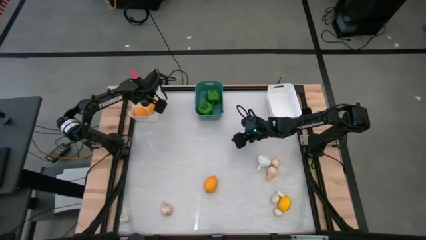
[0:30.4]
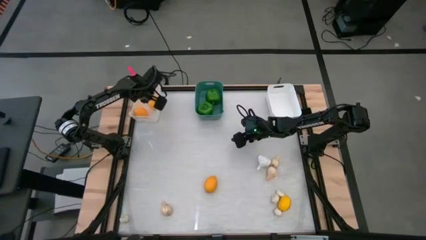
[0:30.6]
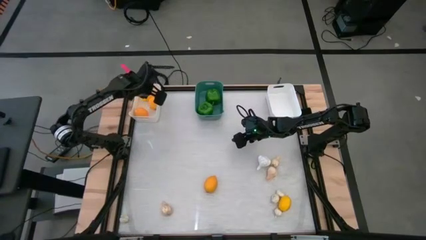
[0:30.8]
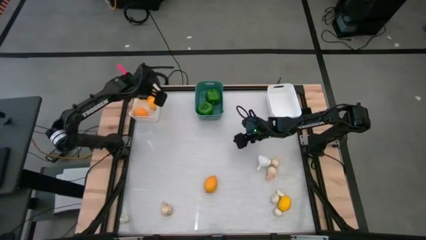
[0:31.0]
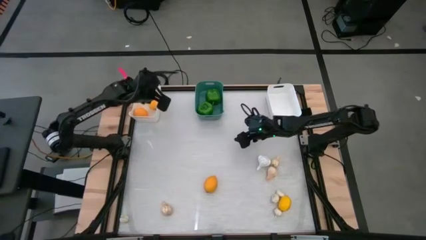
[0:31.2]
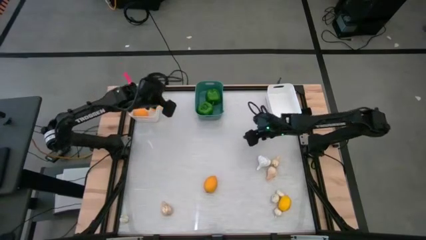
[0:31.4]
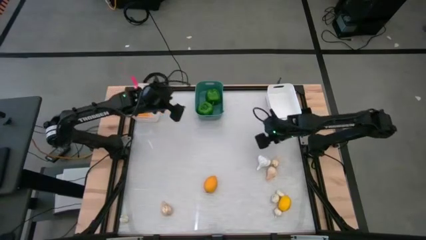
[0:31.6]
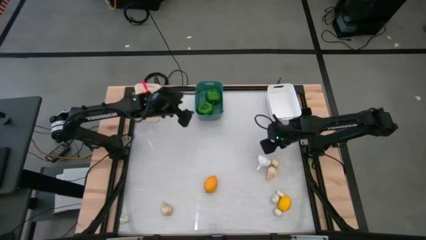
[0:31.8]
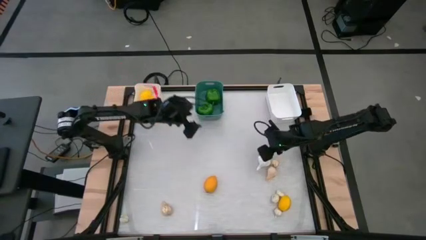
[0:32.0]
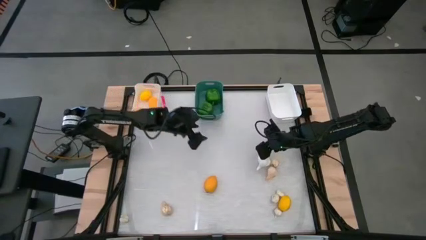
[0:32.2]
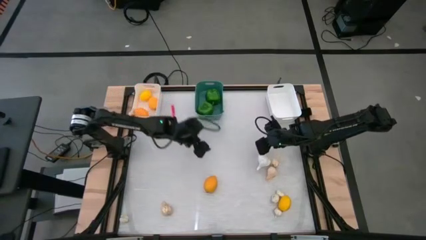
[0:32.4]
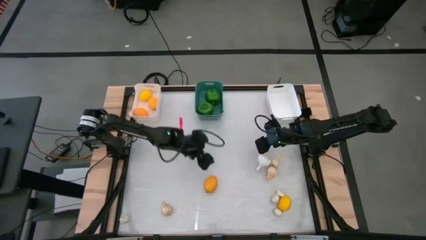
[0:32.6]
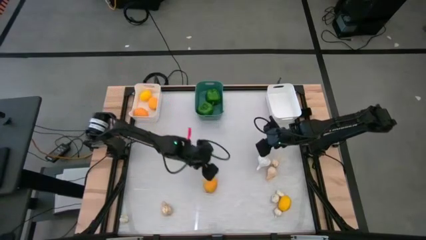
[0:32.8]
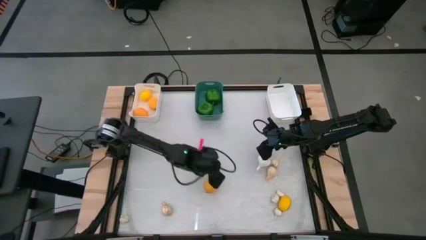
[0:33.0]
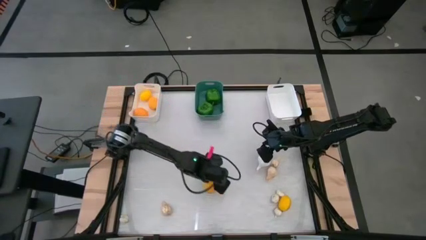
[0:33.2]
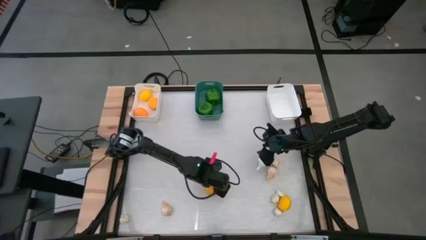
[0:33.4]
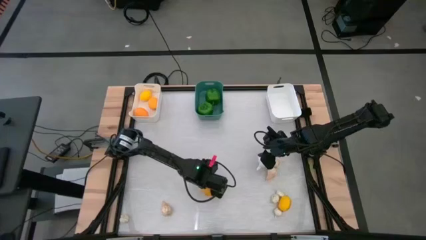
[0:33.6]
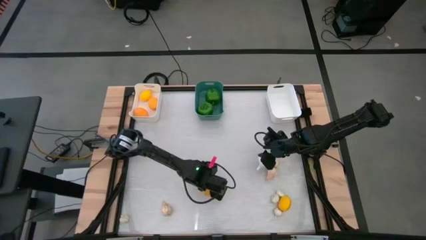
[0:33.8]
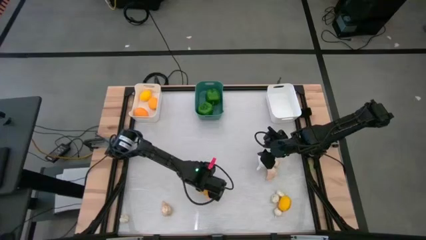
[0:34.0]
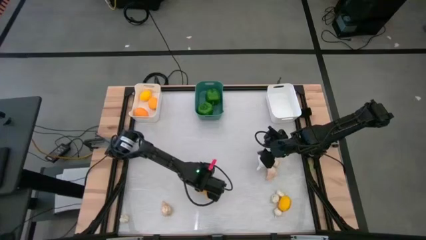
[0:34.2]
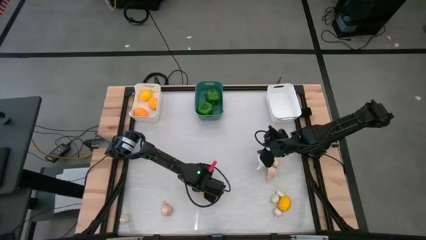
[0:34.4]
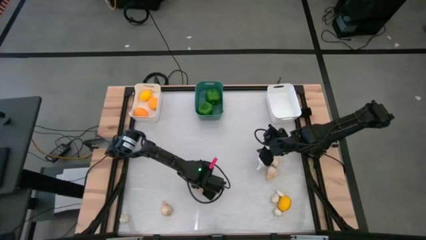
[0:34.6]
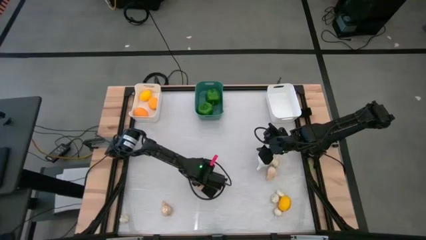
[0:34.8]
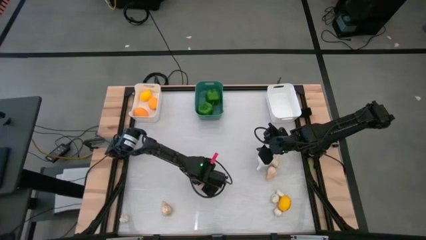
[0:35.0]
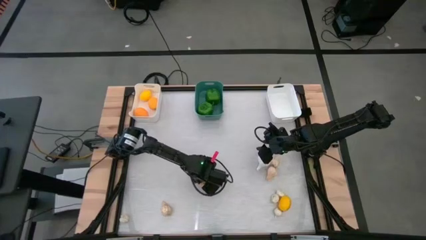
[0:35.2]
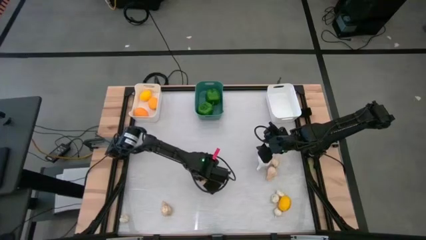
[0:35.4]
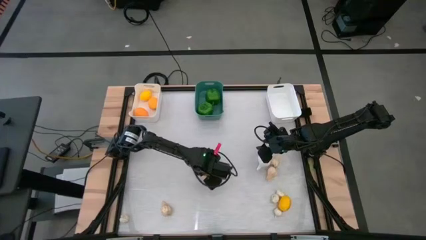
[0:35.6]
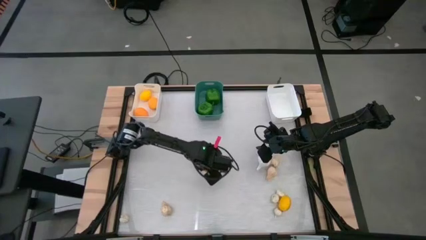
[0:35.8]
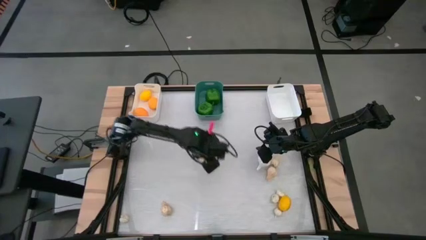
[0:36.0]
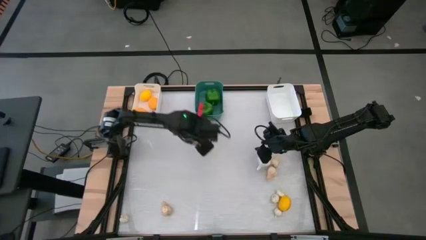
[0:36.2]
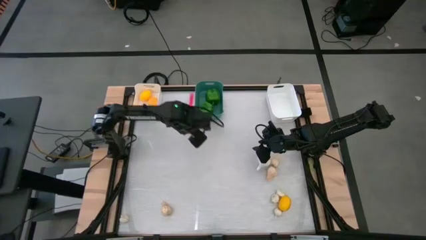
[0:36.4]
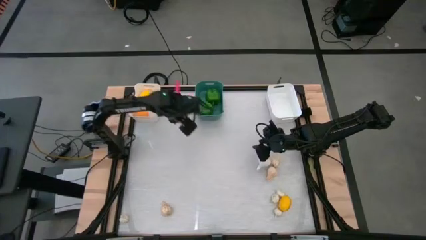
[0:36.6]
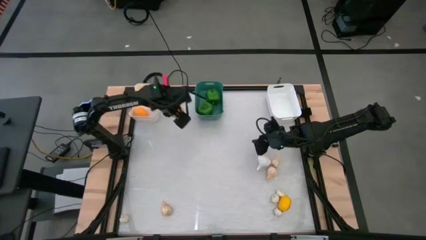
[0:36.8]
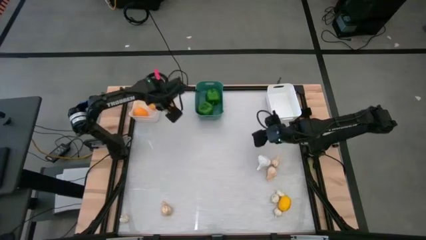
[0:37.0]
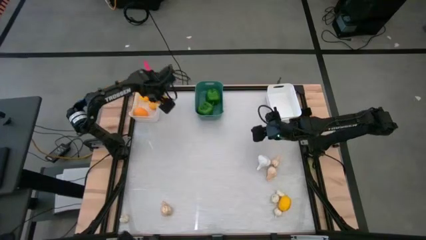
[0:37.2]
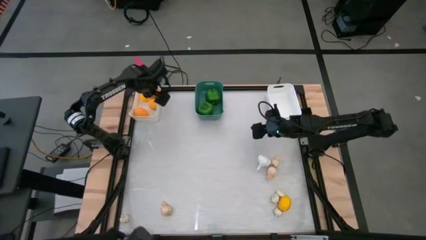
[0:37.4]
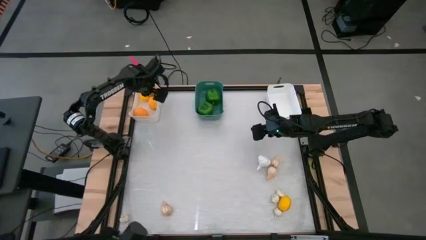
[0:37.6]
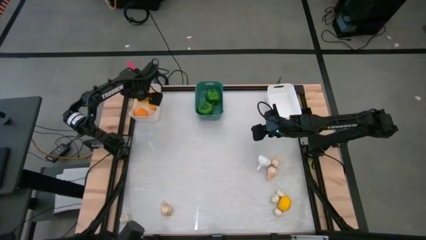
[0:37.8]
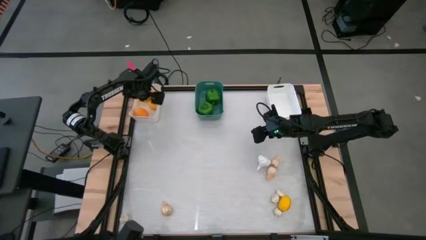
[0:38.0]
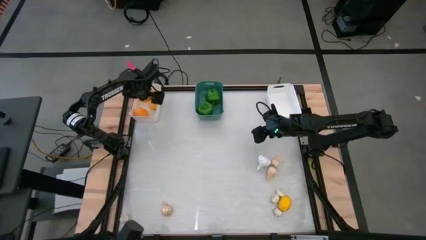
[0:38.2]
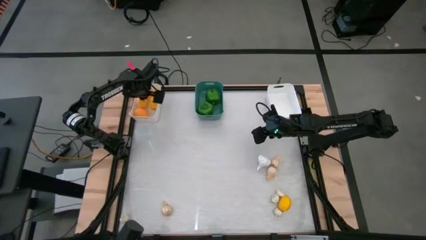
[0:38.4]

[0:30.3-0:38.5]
Task: Sort produce into baskets
Put the left yellow lemon into the left white bin

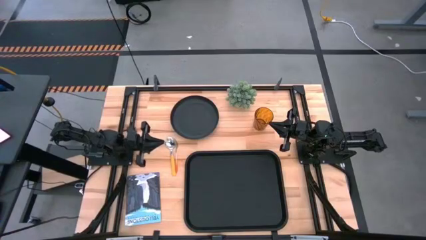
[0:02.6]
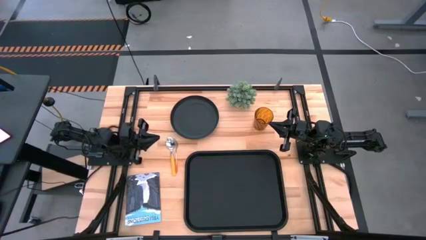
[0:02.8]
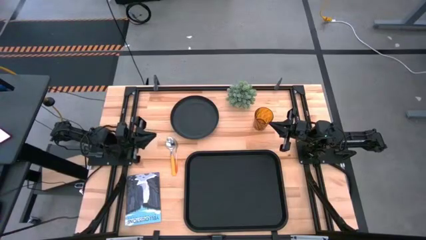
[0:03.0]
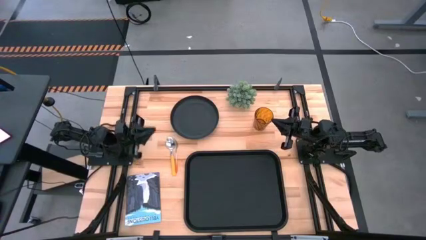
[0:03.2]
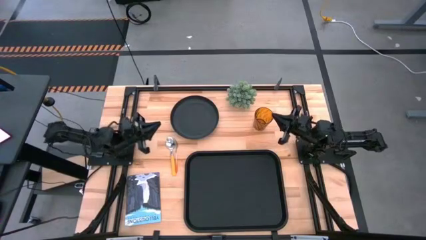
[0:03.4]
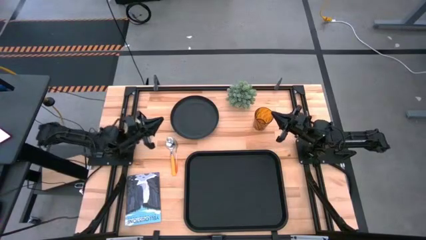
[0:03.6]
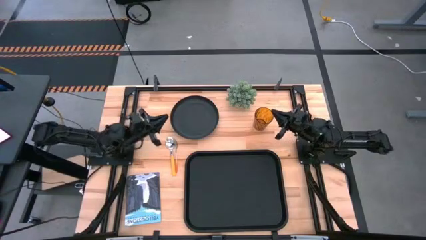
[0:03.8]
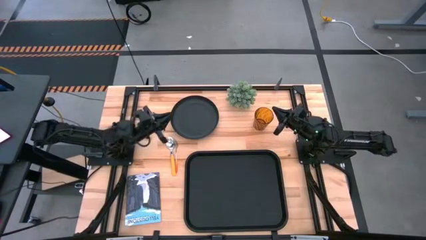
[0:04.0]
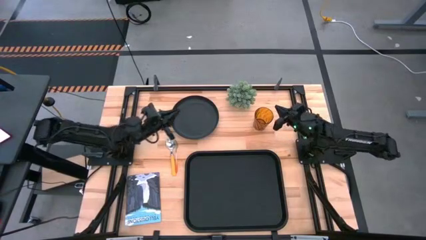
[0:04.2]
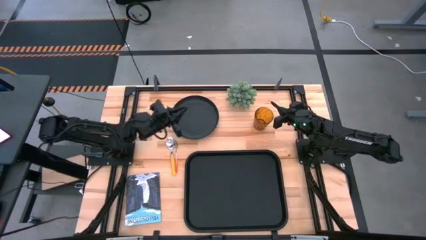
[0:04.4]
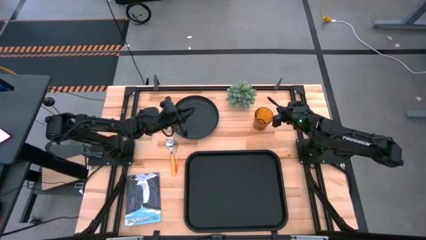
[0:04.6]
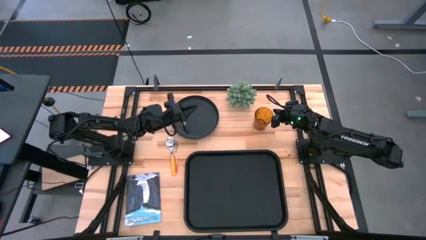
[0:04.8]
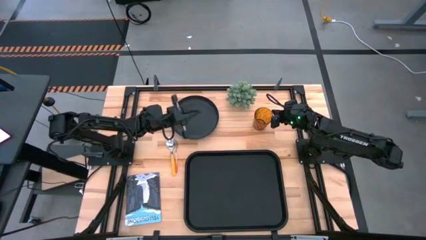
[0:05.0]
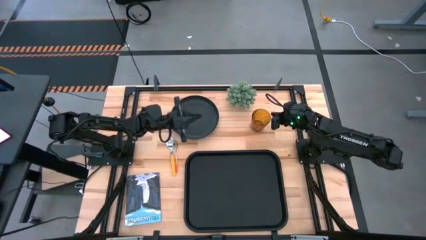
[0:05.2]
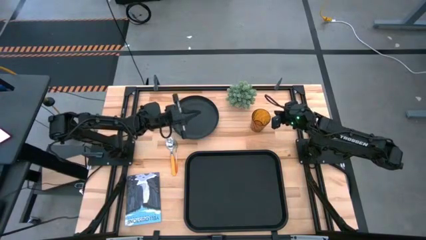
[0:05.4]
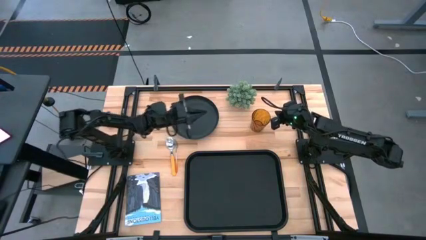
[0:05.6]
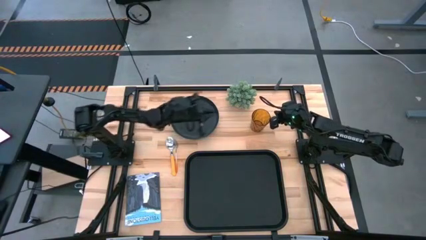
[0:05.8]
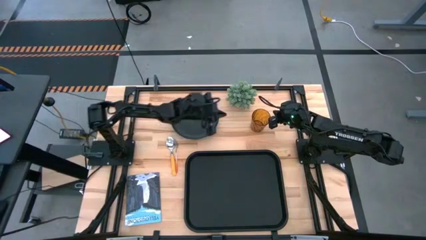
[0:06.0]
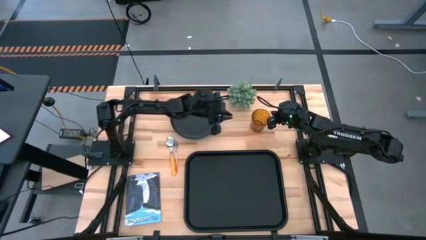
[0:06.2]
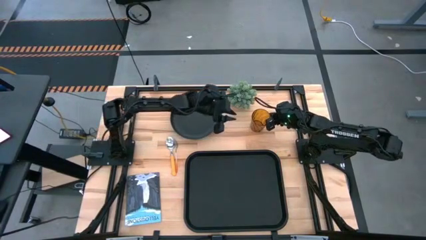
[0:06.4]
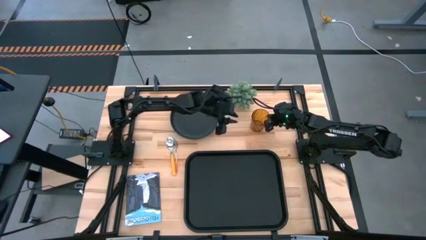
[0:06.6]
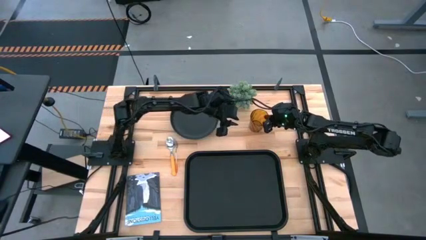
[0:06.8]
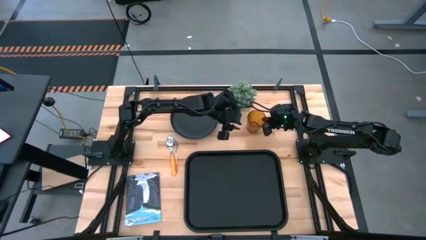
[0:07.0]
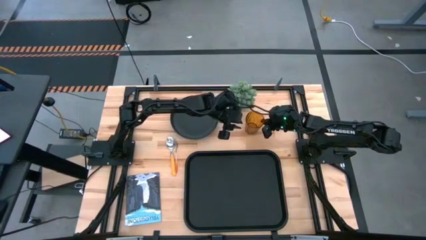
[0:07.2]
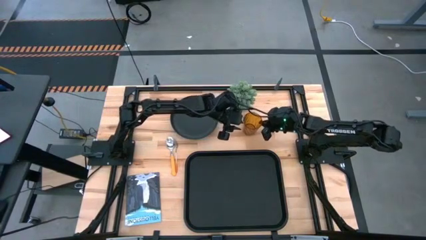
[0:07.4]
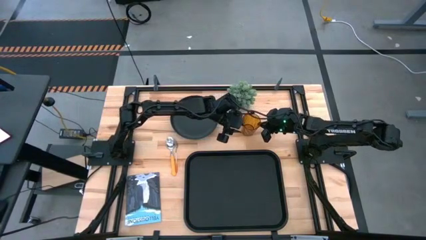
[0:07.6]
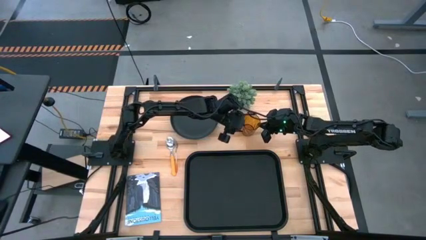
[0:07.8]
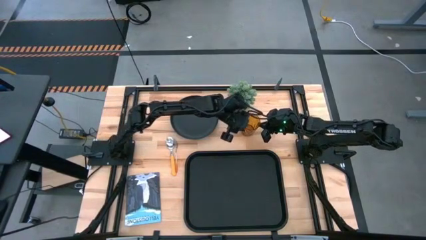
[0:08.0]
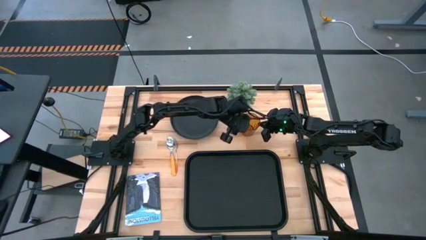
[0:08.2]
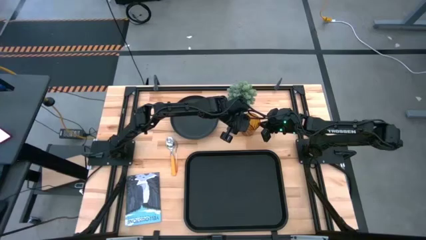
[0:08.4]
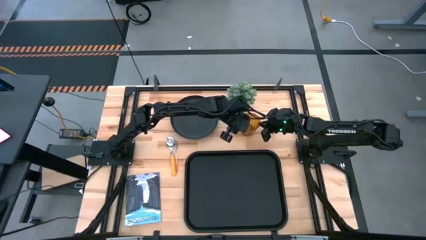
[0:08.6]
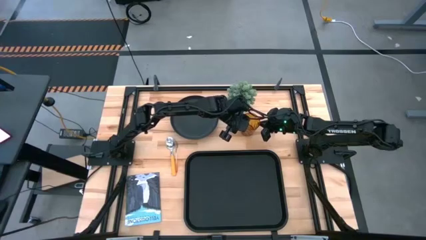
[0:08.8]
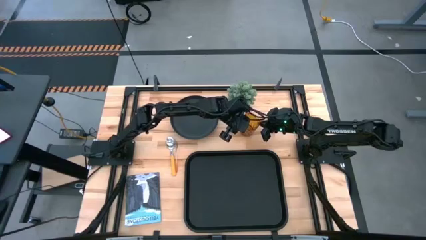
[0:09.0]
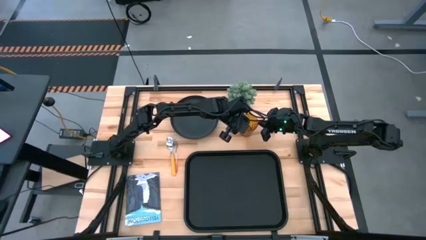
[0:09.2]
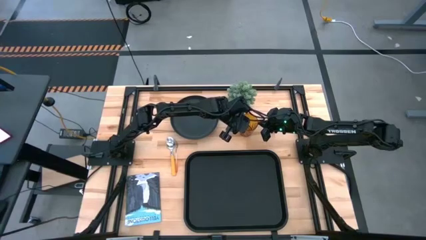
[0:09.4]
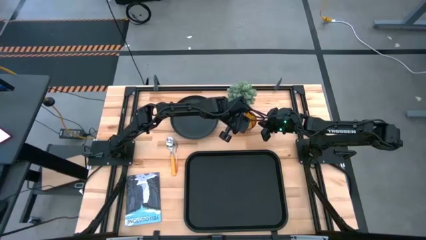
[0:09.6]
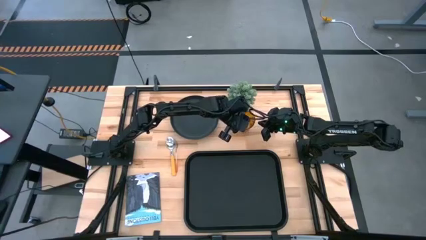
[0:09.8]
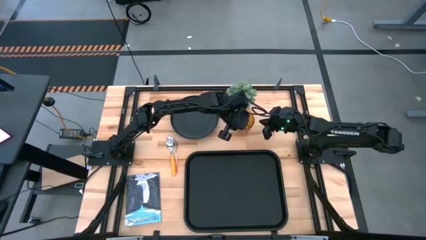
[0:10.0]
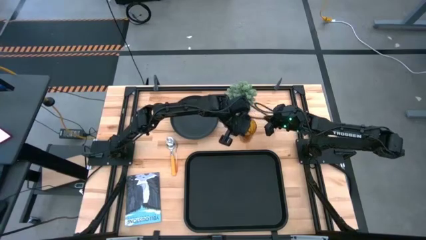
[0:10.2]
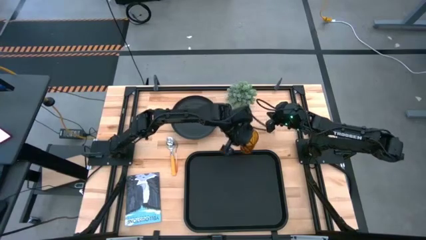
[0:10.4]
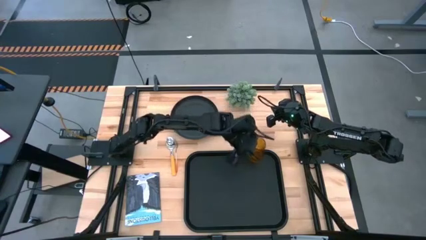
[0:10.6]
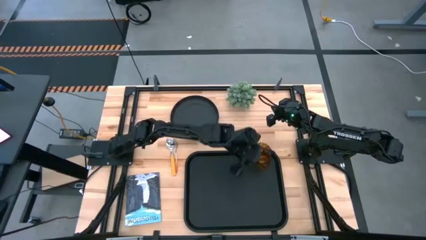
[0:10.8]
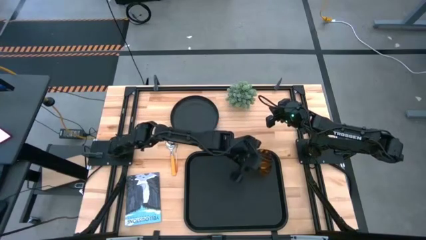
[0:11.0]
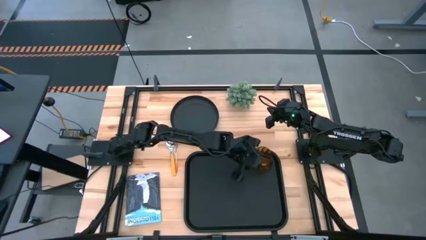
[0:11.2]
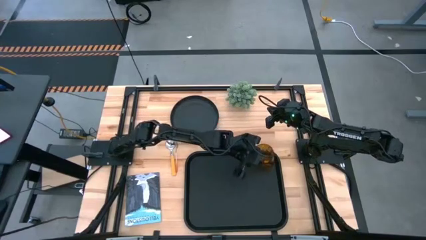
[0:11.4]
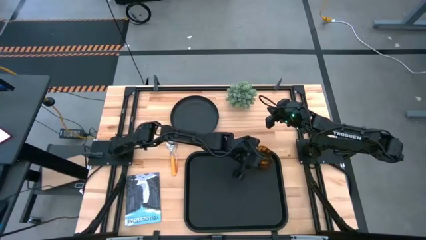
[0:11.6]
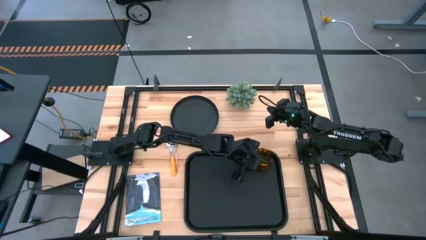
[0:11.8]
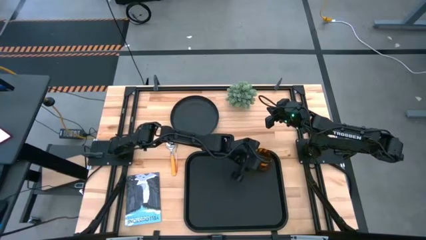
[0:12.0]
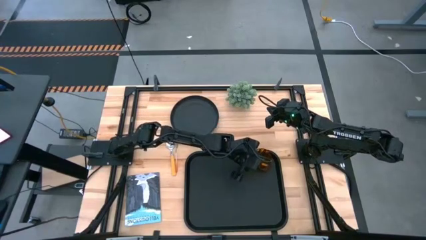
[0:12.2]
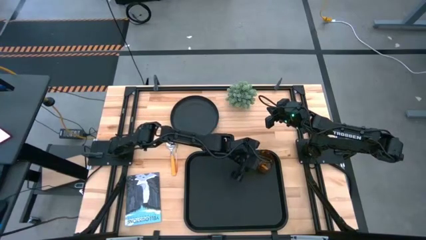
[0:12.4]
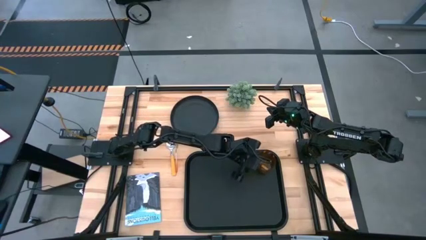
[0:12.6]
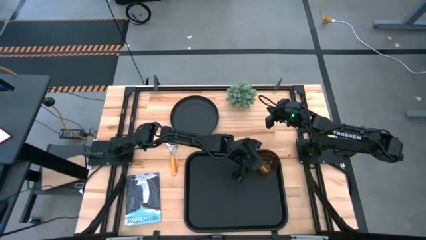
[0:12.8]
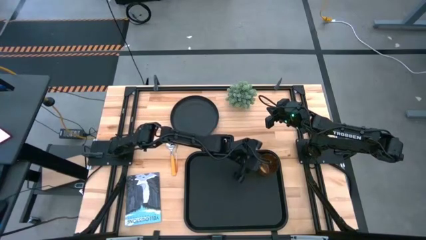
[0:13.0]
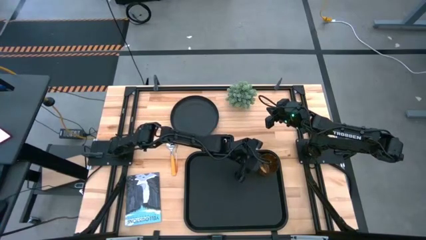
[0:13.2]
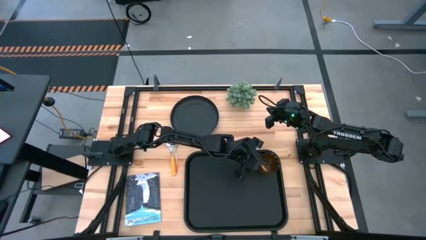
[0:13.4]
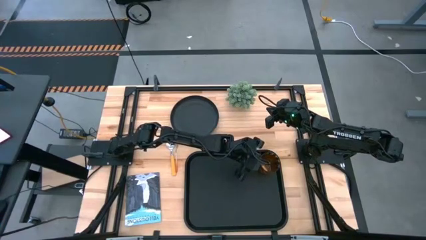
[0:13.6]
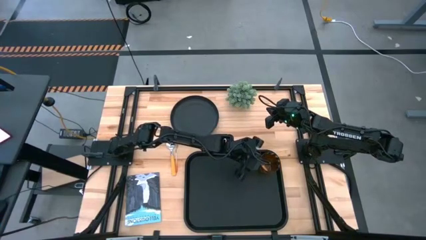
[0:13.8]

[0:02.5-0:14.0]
Task: Pick and place plate/cup/fork/spoon on tray
Put the brown cup on the black tray
